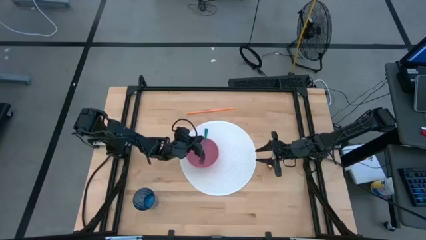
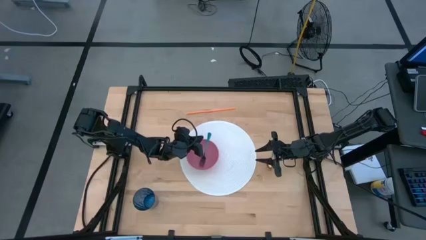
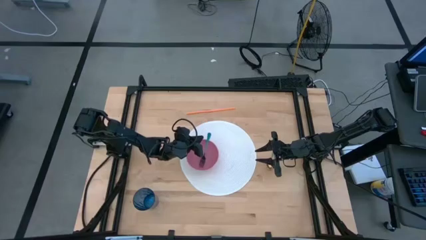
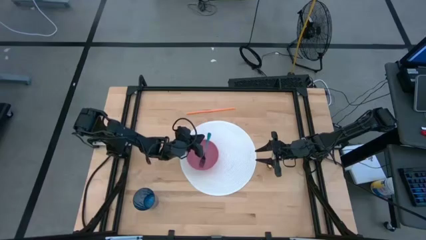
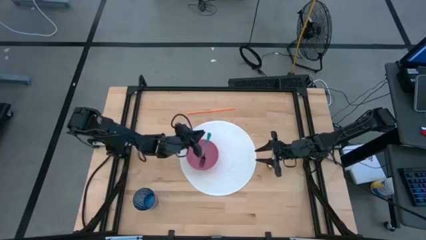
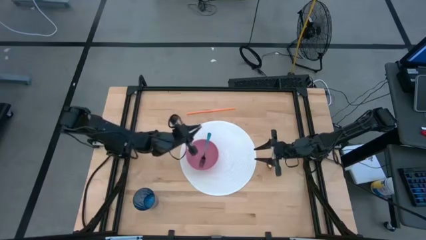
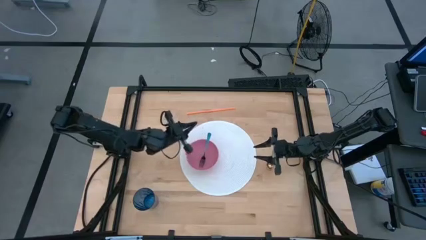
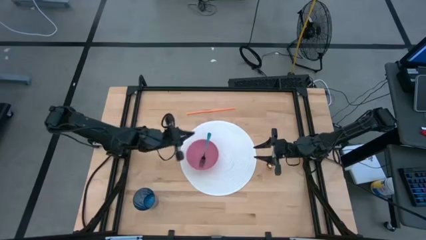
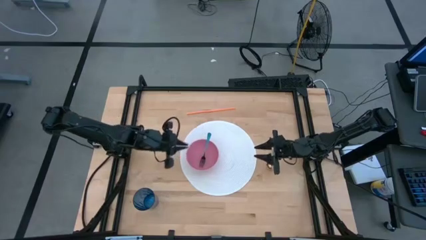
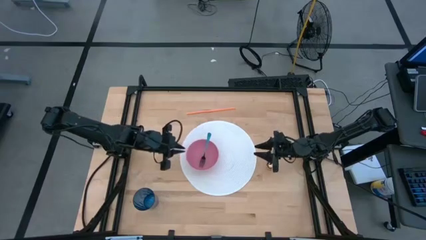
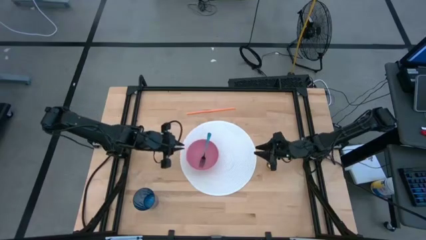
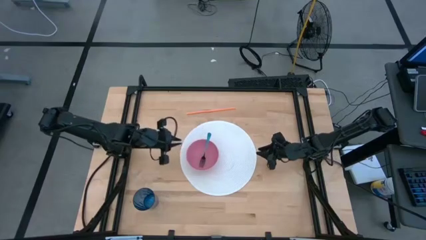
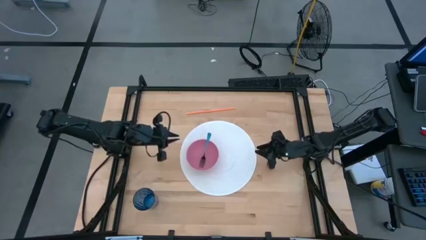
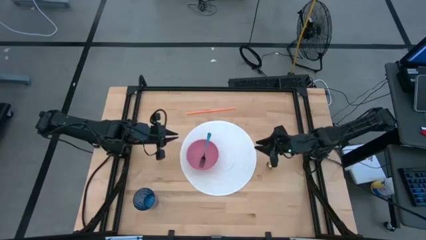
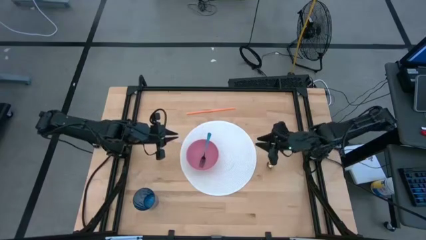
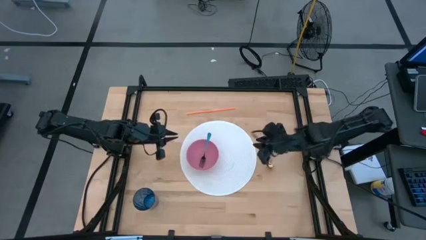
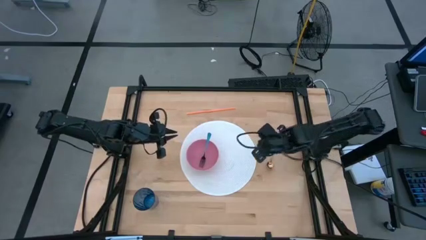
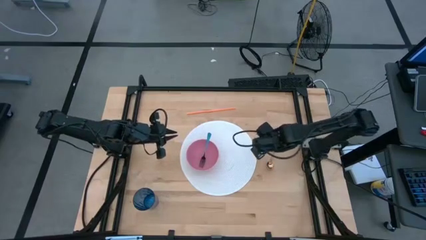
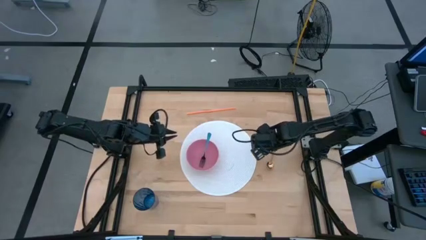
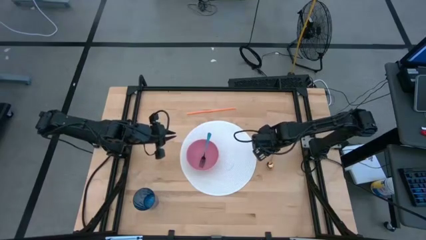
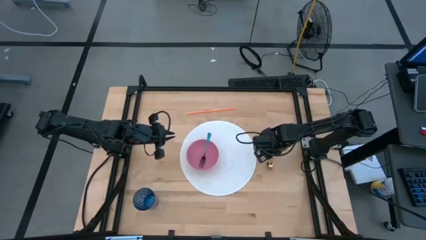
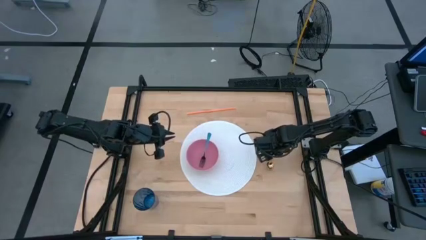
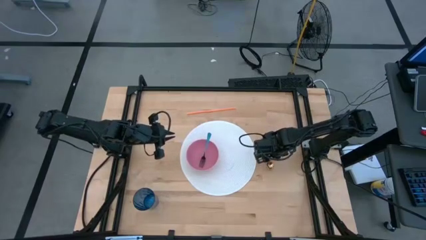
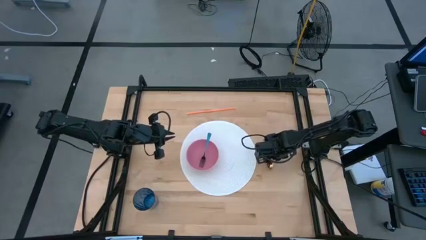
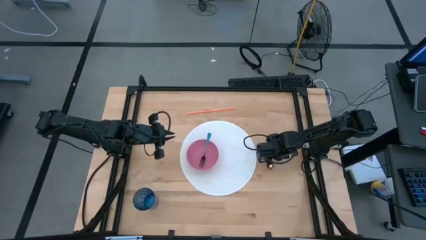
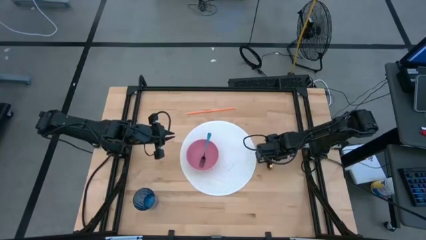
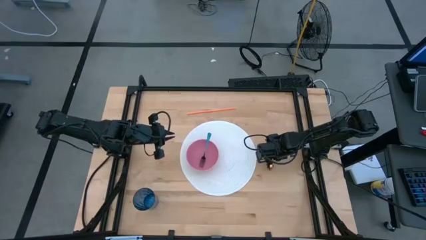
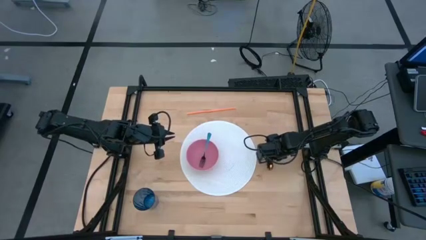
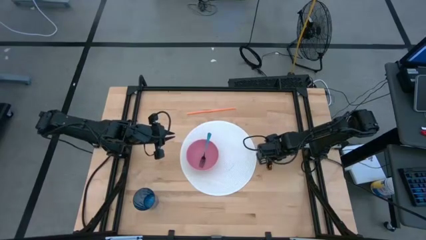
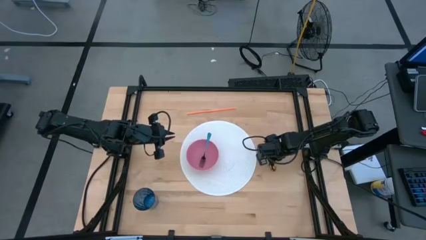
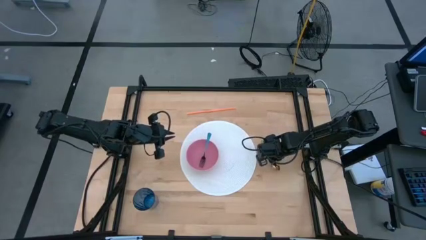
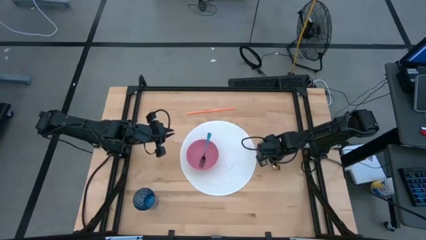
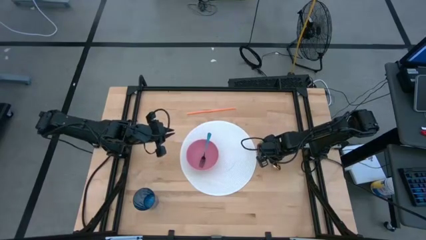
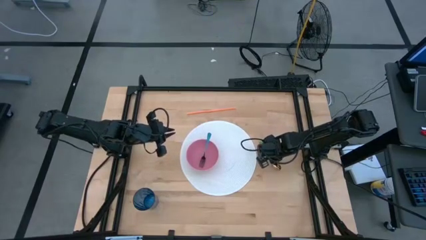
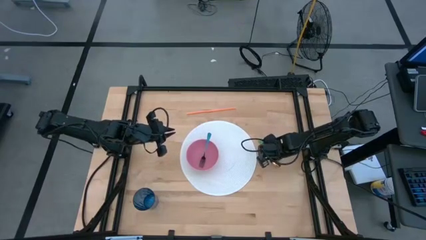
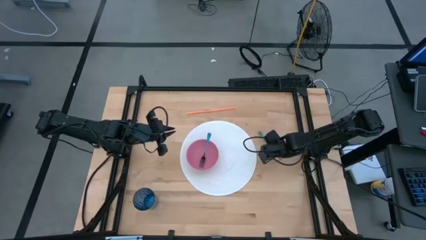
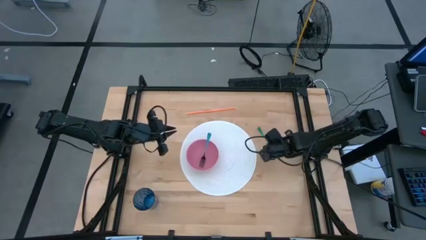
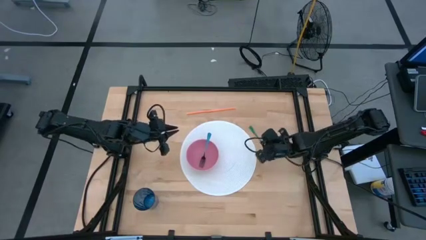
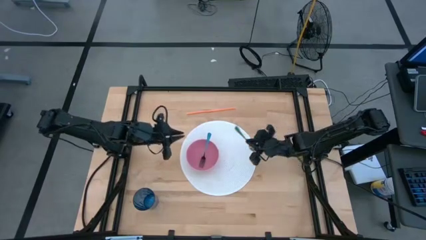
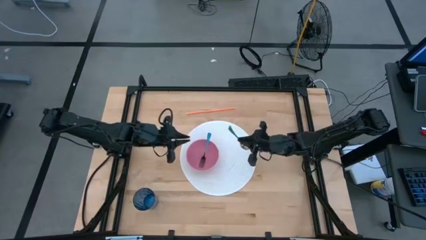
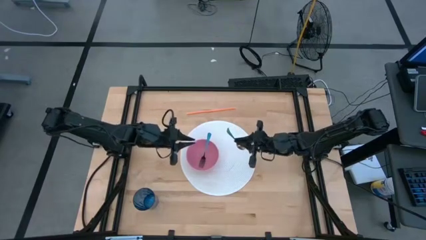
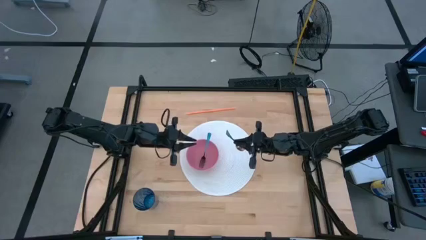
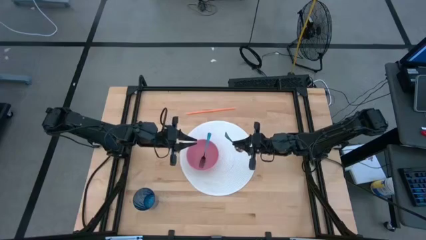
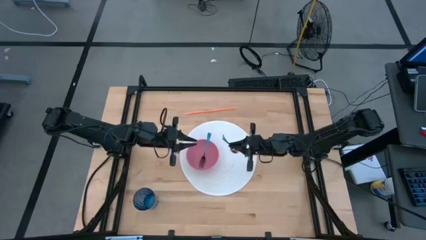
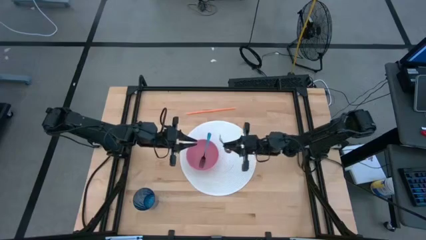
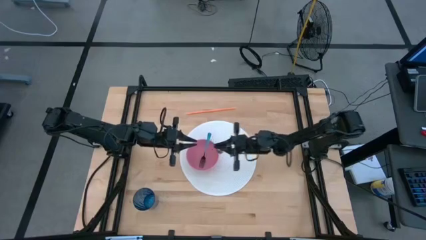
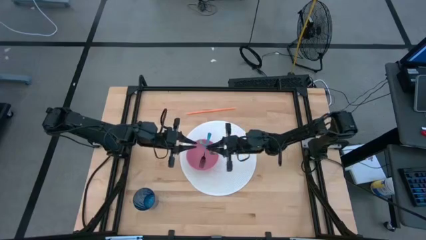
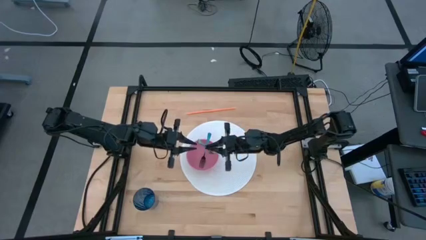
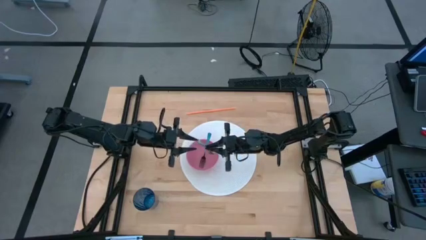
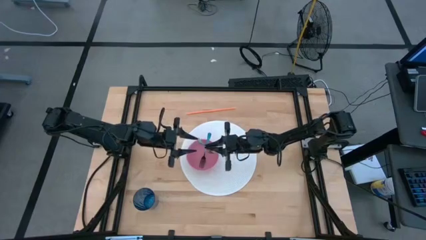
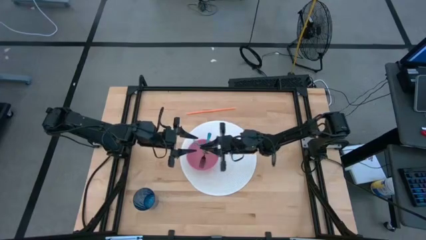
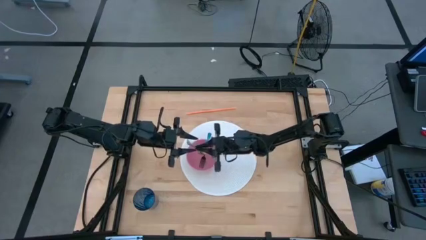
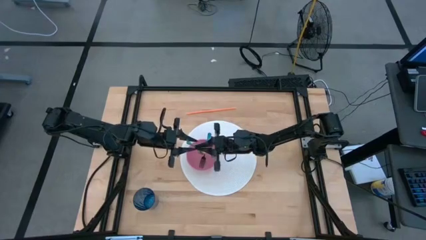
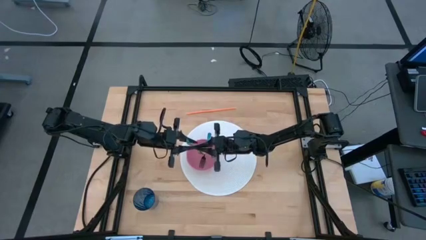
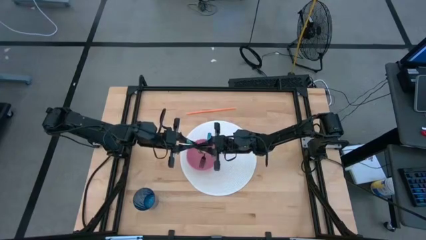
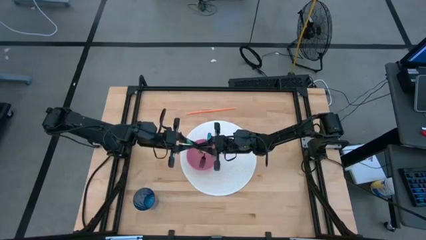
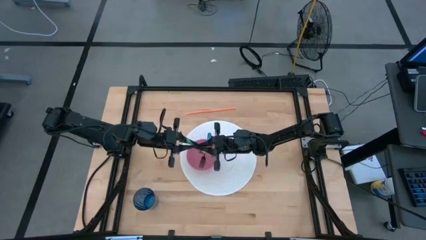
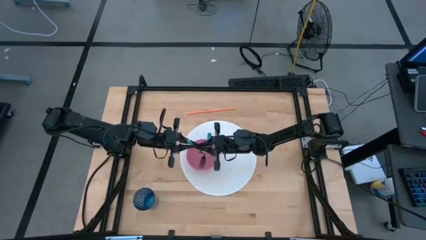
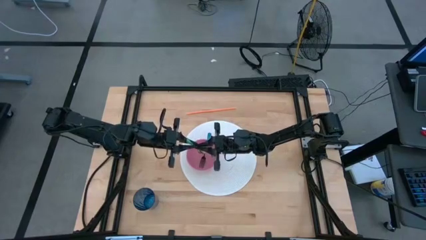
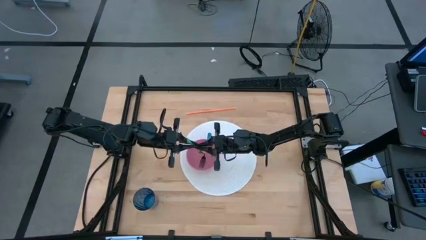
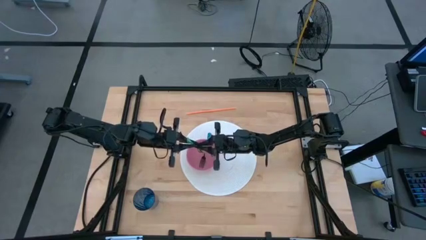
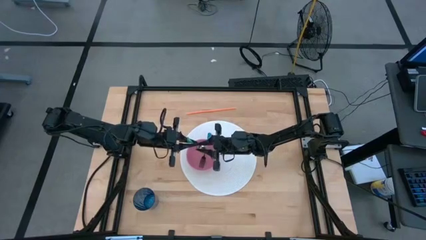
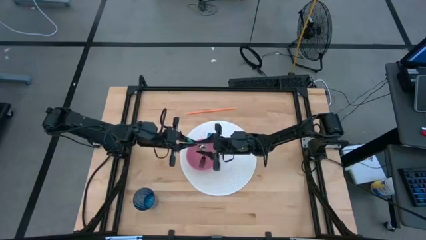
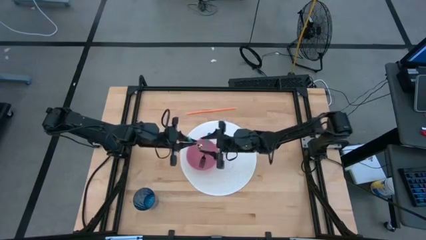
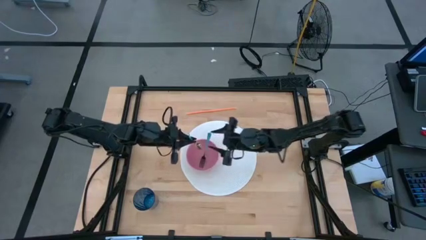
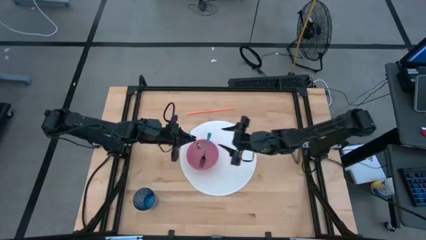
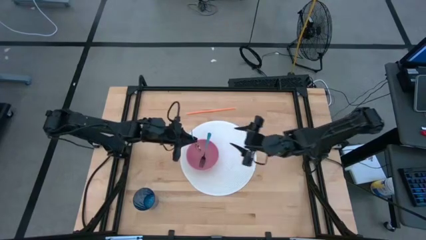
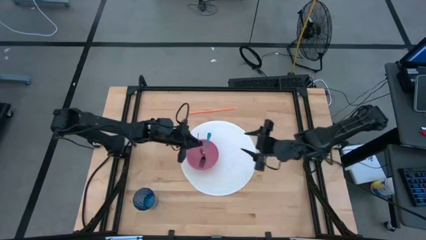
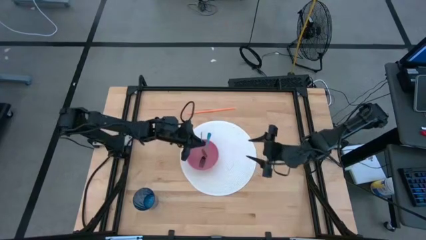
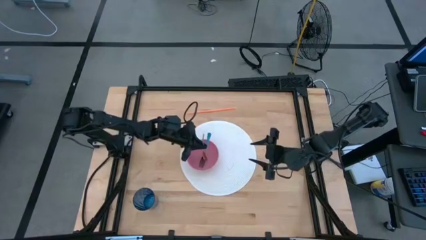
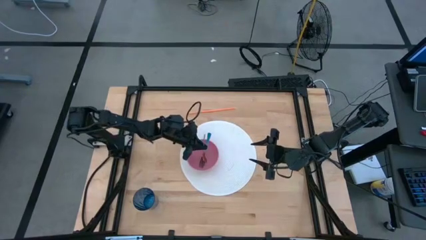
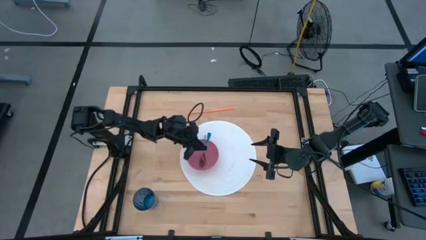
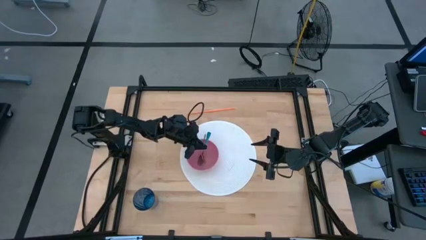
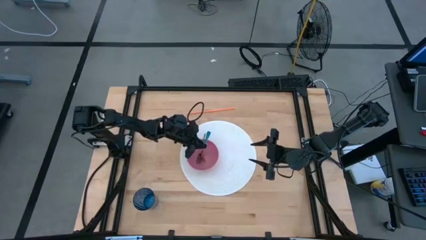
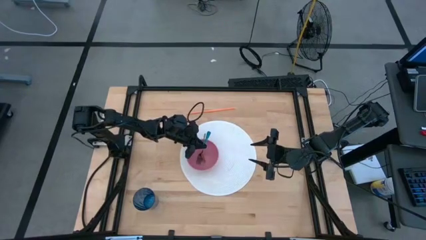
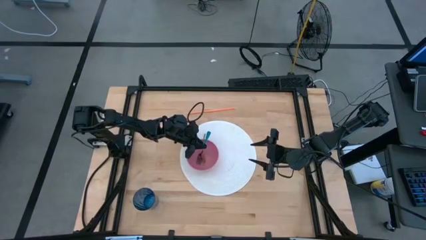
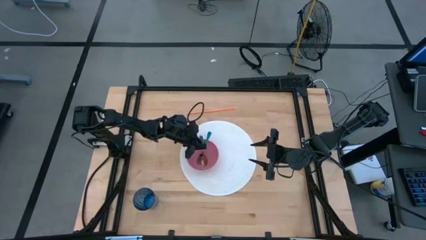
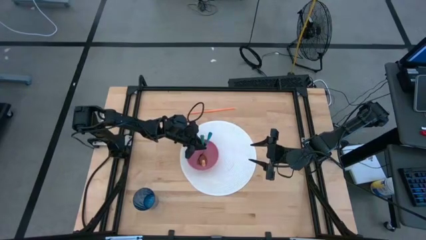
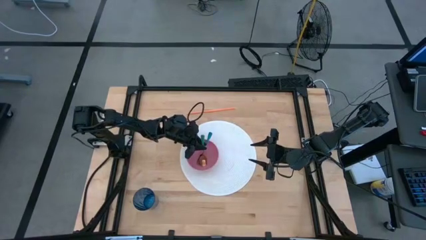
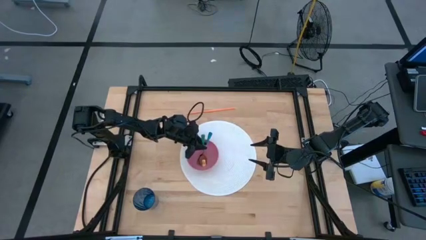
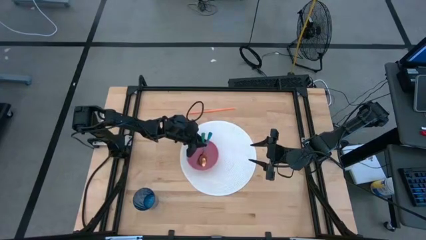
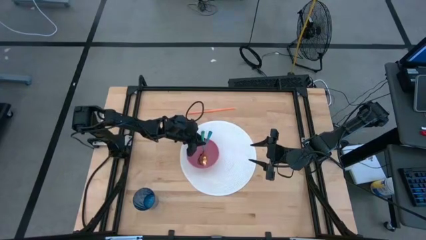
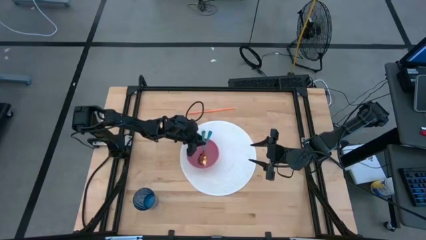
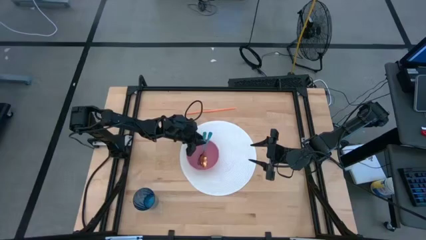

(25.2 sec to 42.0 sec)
Task: Pick & Place Utensil
Put the green spoon into the pink bowl
